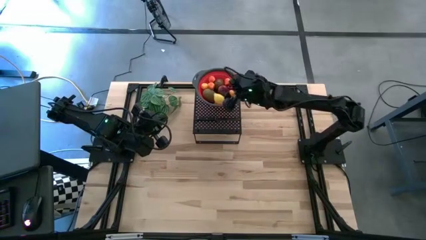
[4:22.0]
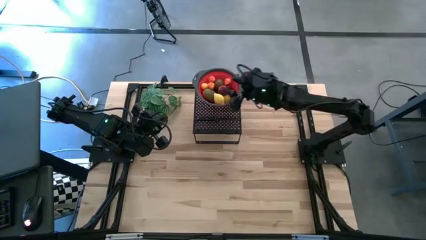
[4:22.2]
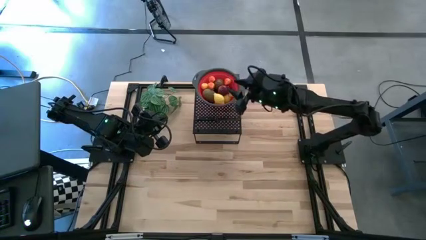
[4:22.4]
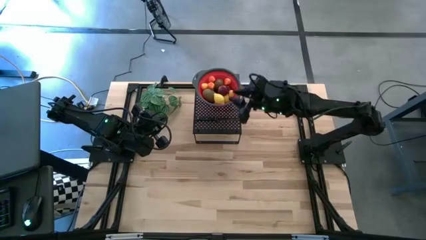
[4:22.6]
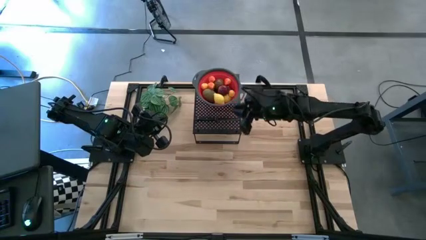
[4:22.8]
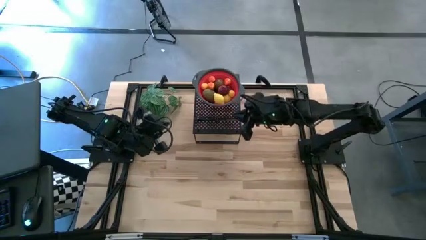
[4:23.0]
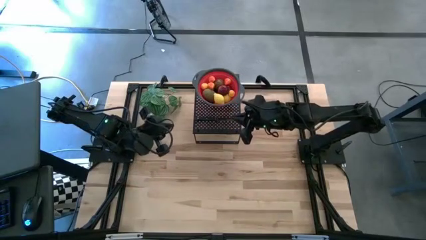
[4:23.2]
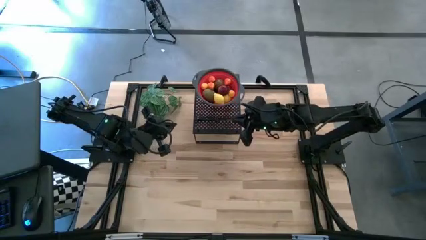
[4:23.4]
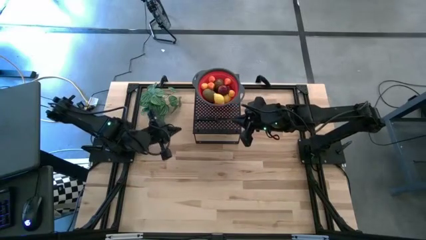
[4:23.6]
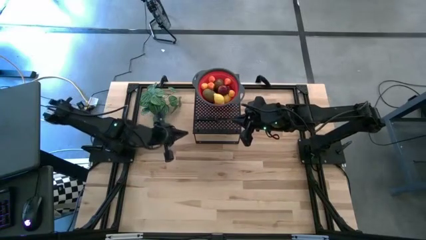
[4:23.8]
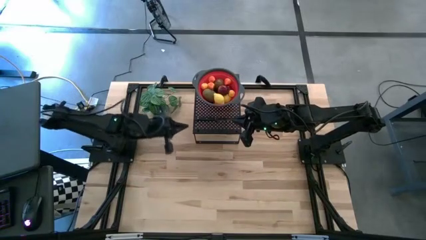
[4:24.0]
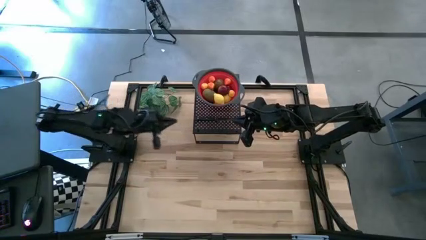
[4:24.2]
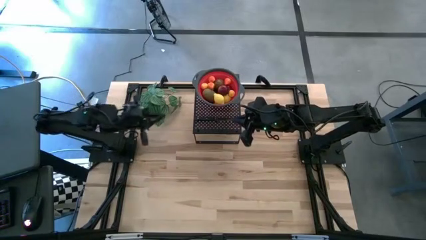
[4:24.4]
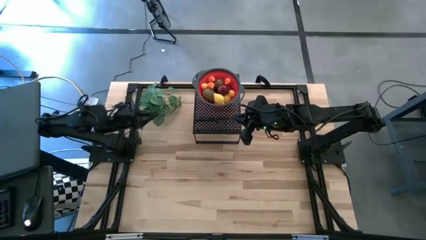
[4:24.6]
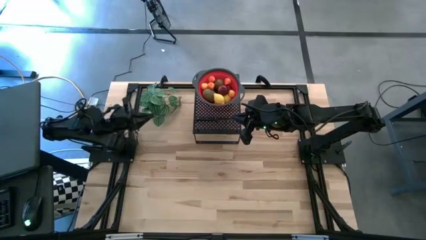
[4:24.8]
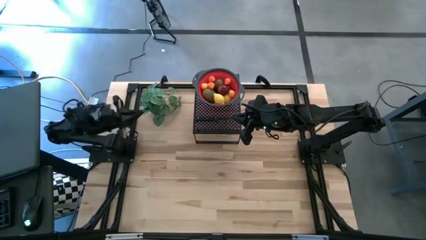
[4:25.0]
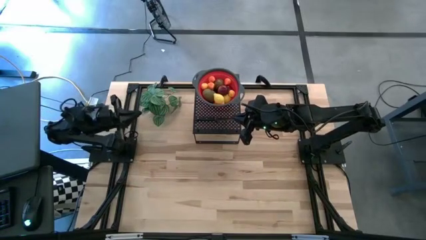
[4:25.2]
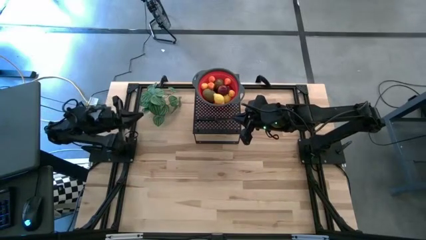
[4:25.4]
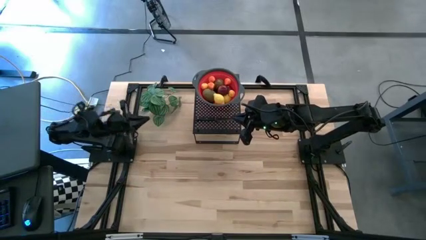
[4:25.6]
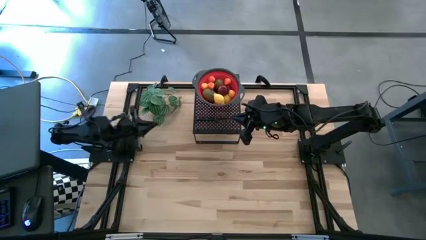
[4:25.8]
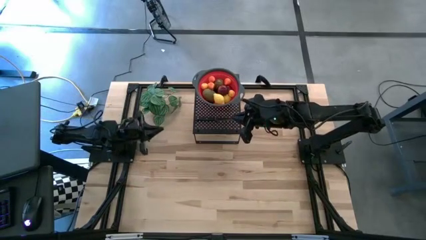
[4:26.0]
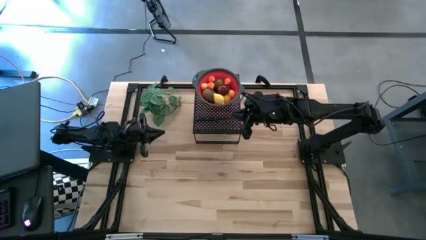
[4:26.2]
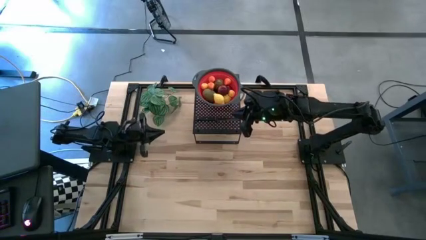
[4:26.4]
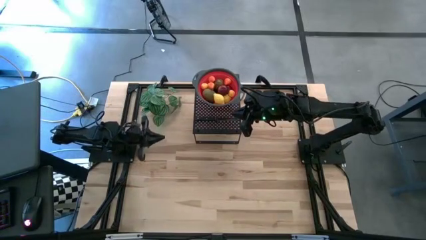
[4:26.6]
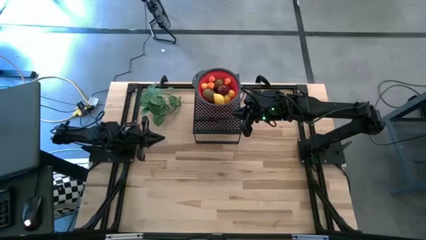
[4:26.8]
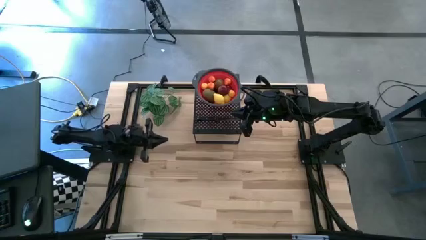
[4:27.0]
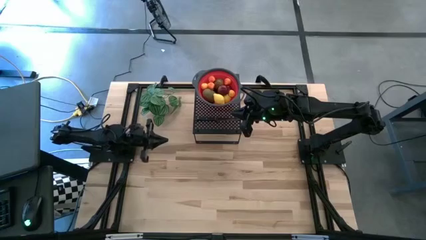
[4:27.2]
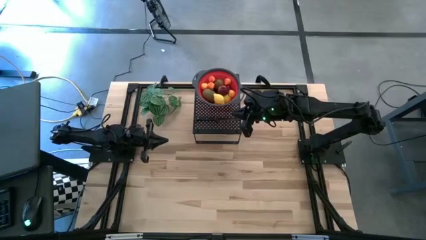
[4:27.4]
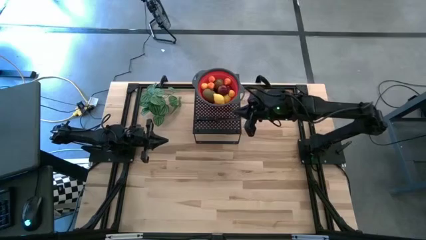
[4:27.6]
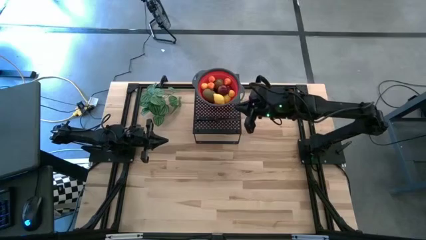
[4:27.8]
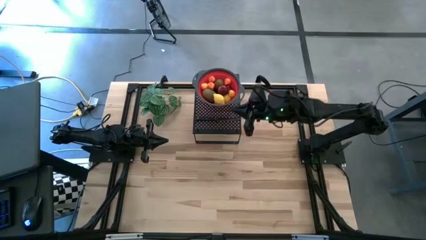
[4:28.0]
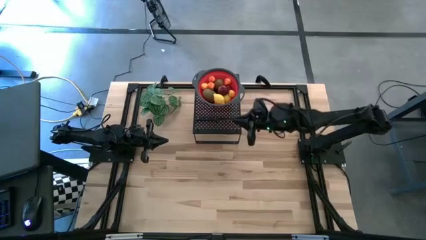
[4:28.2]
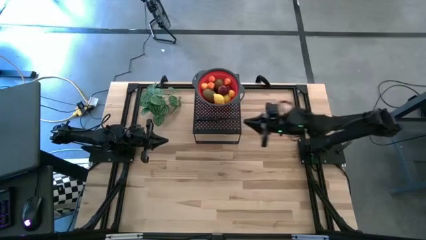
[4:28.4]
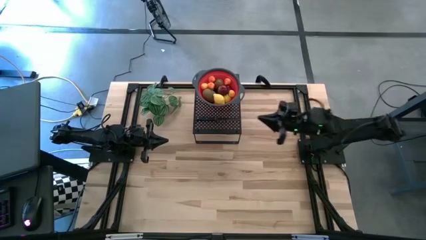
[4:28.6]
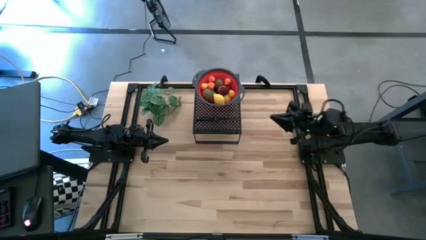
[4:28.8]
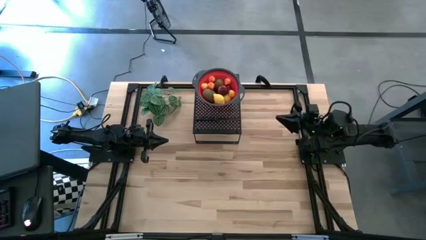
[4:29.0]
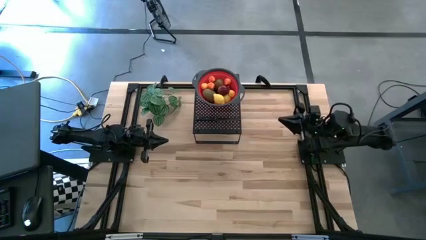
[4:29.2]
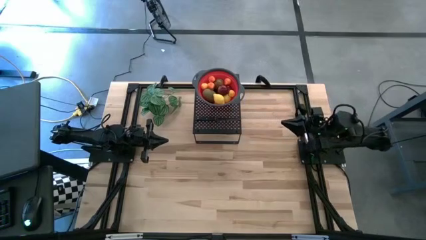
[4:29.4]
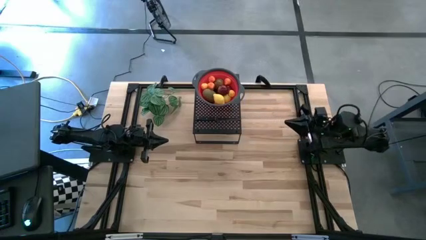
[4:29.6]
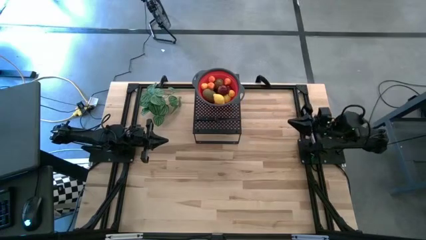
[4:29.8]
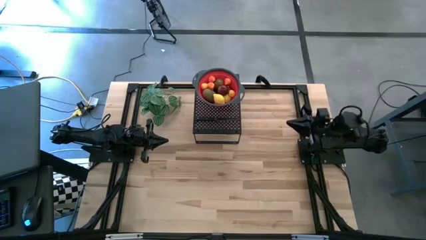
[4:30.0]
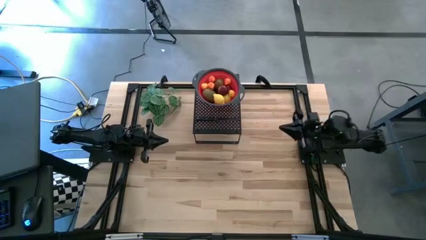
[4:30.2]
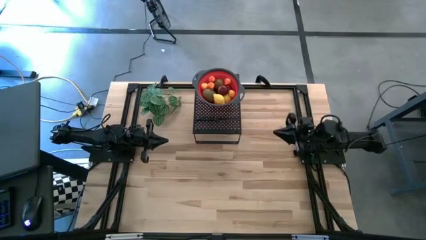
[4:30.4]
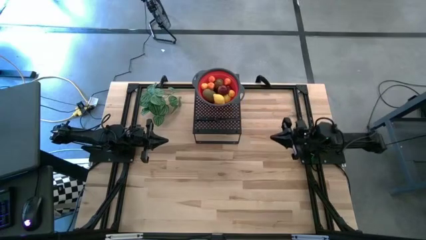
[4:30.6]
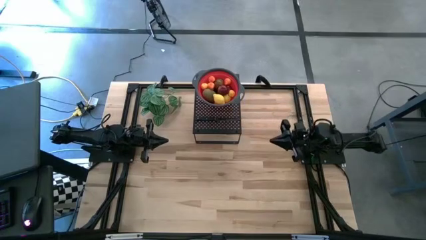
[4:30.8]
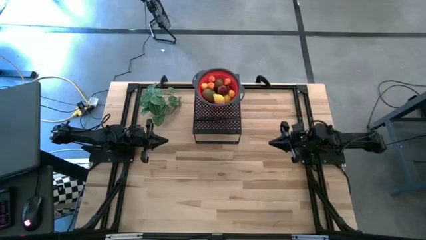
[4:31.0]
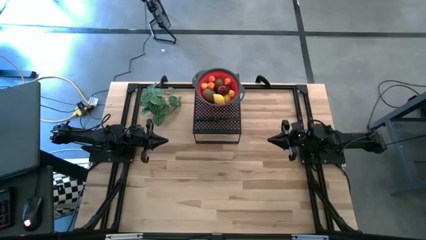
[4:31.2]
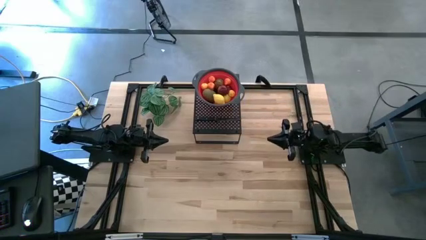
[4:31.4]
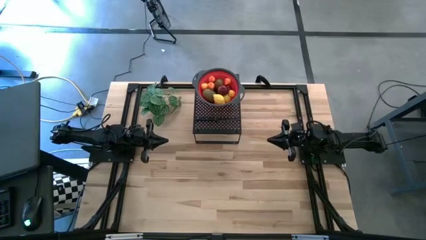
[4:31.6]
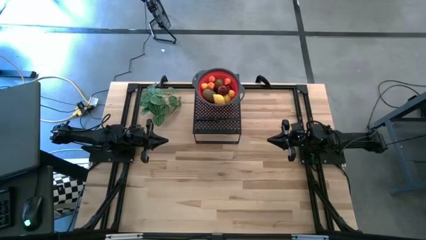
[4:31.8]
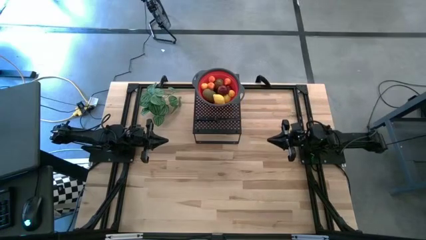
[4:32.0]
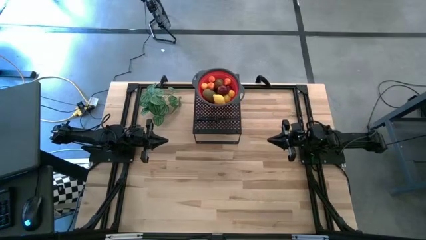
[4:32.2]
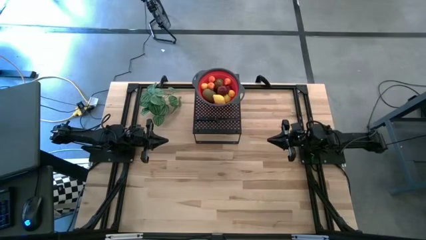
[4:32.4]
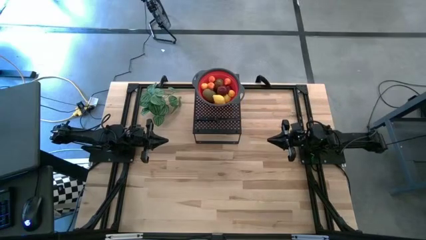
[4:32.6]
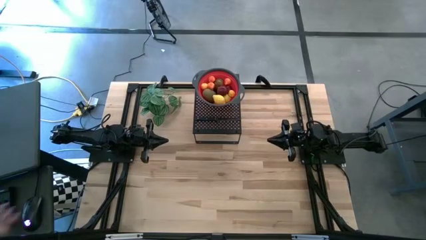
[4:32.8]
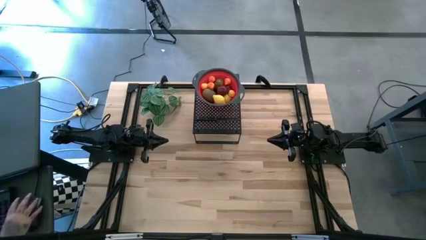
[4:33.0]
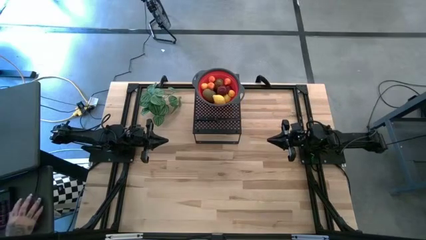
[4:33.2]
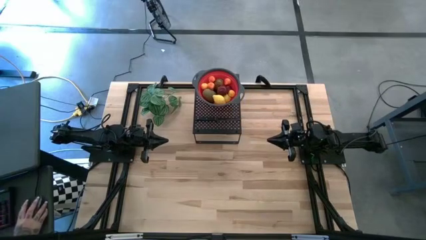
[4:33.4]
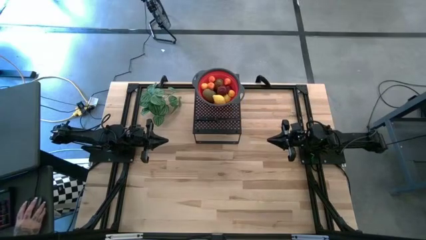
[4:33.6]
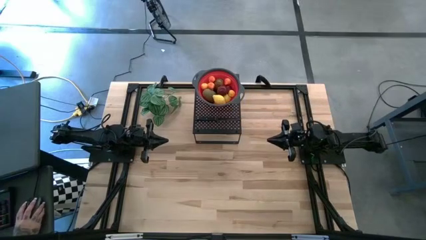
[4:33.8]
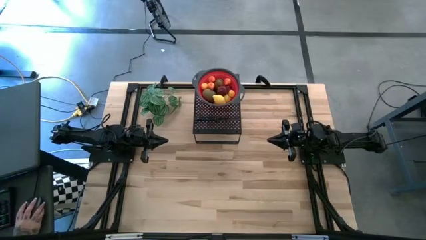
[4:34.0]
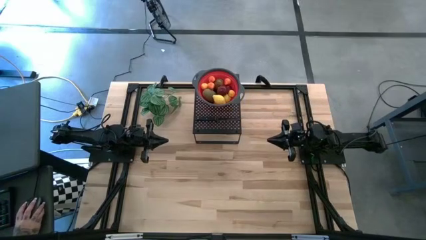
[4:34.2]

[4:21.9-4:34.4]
Task: Pick & Place Fruit
Return to Home Position
